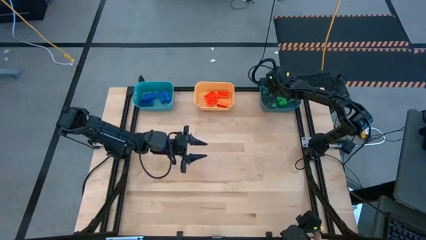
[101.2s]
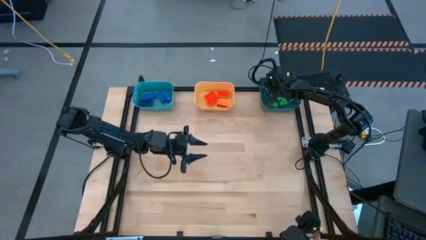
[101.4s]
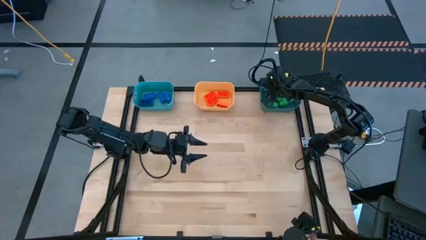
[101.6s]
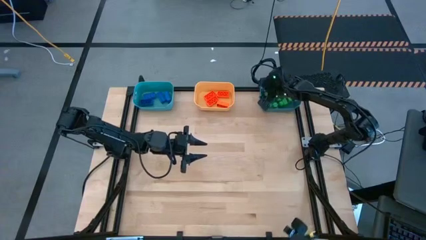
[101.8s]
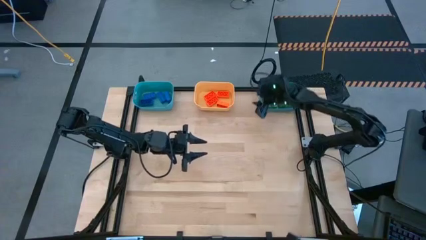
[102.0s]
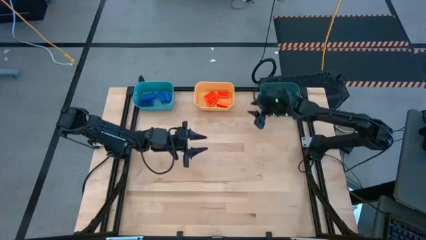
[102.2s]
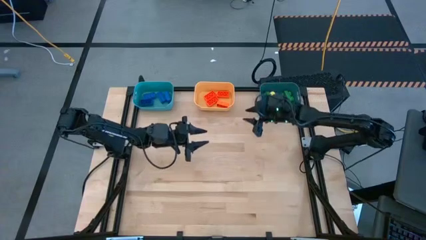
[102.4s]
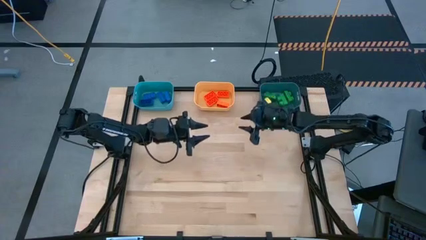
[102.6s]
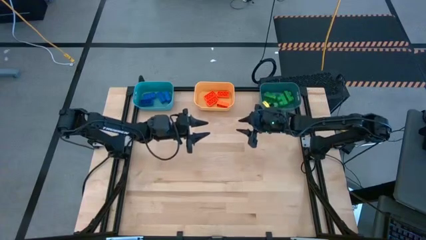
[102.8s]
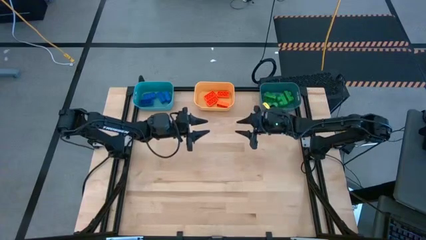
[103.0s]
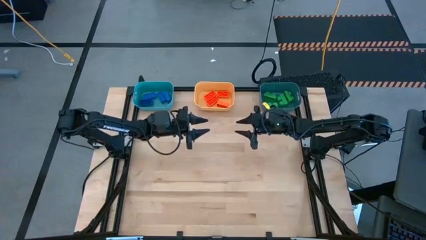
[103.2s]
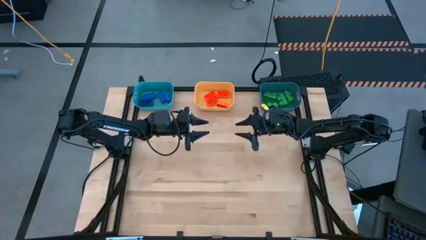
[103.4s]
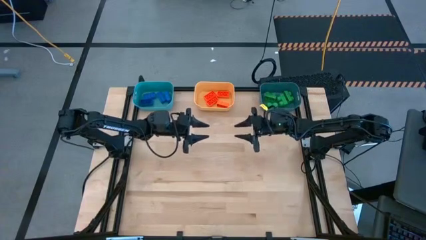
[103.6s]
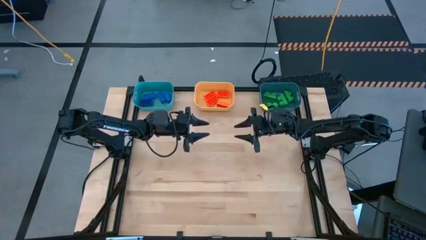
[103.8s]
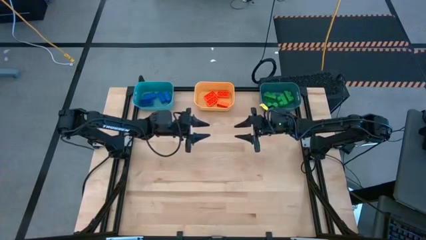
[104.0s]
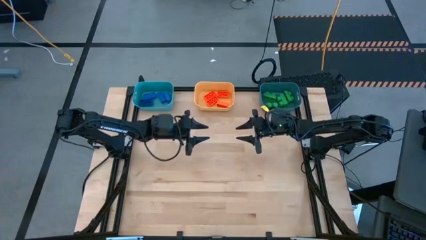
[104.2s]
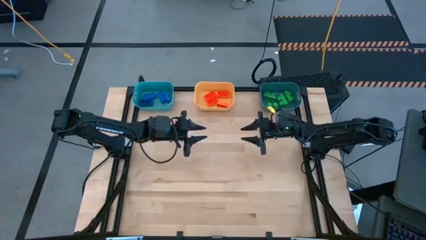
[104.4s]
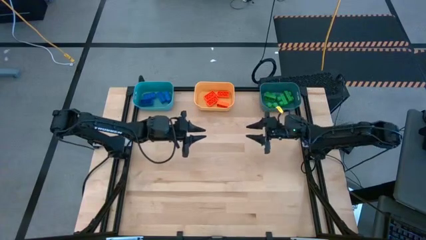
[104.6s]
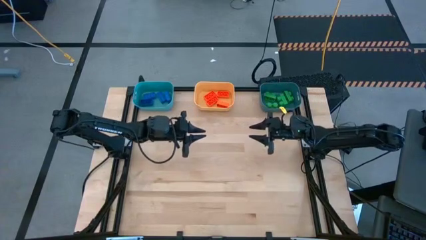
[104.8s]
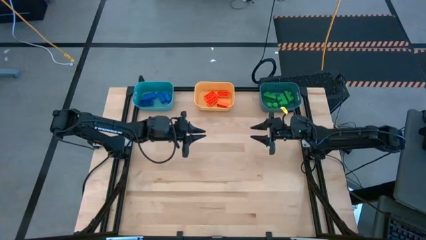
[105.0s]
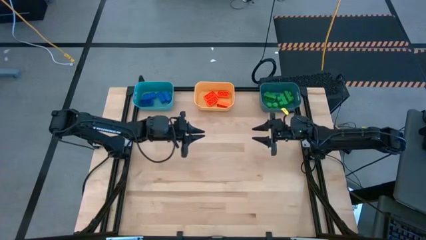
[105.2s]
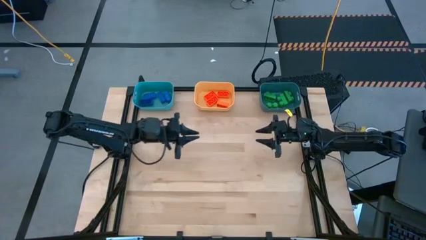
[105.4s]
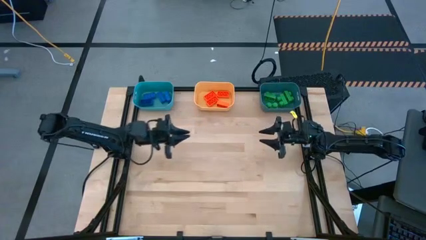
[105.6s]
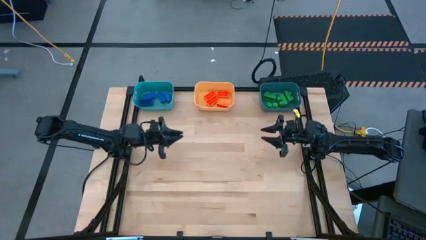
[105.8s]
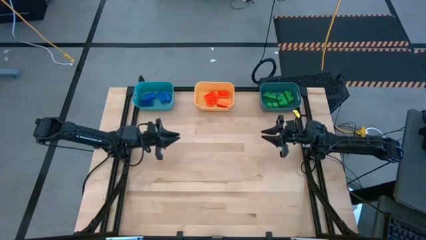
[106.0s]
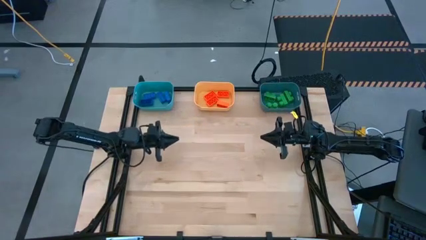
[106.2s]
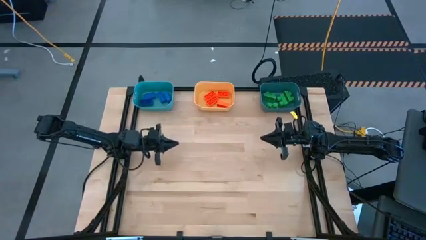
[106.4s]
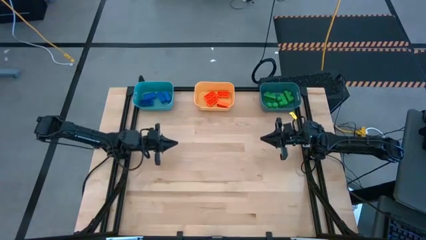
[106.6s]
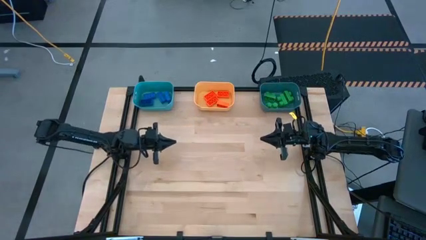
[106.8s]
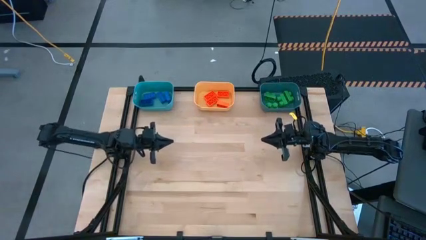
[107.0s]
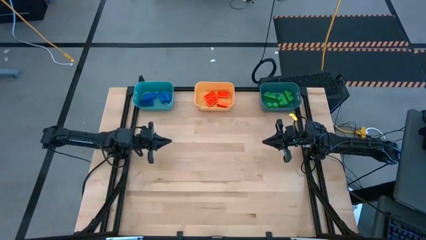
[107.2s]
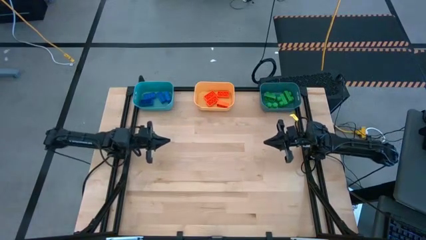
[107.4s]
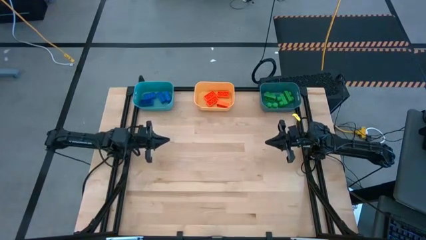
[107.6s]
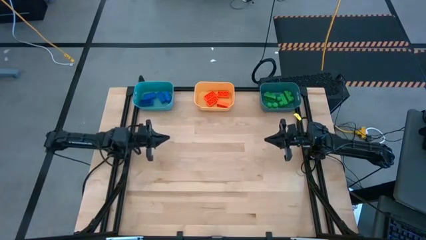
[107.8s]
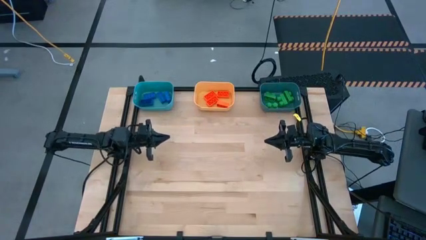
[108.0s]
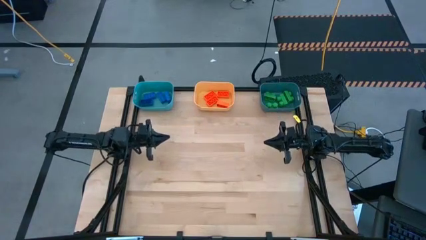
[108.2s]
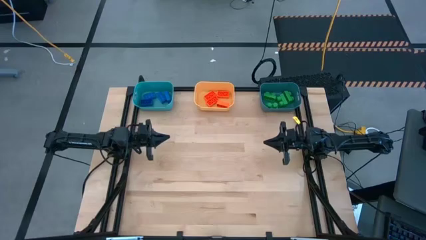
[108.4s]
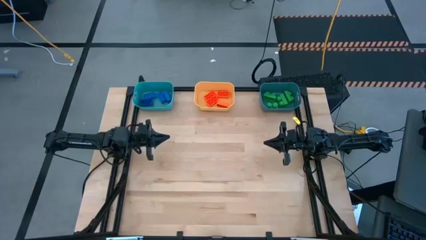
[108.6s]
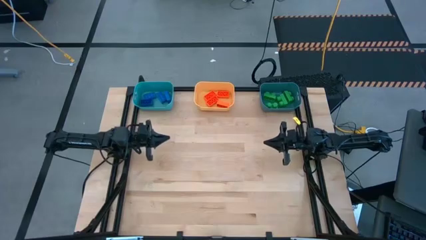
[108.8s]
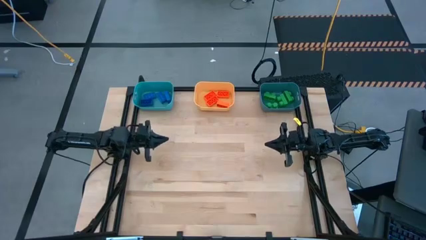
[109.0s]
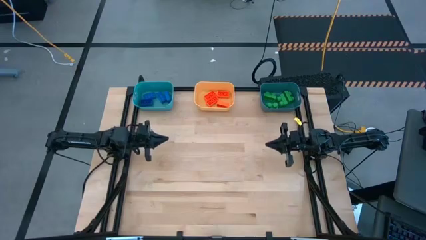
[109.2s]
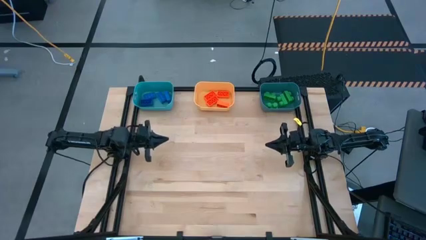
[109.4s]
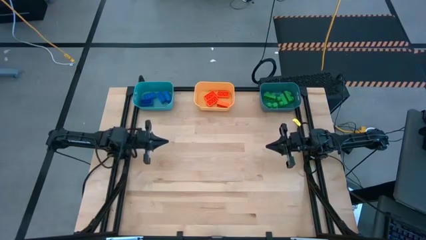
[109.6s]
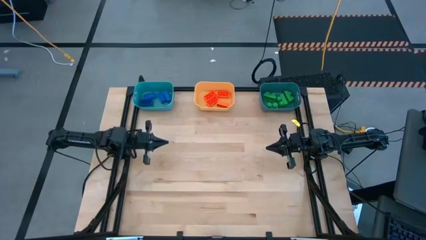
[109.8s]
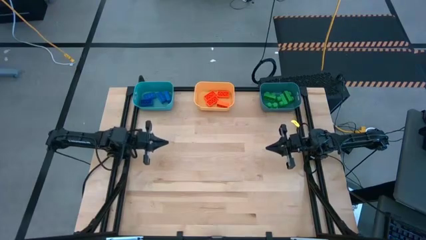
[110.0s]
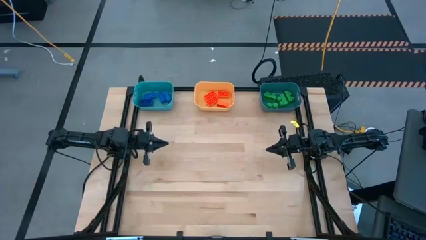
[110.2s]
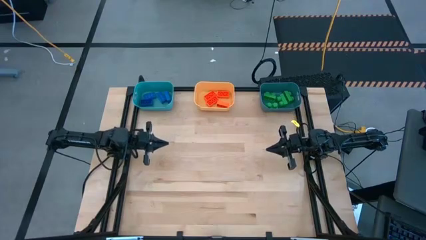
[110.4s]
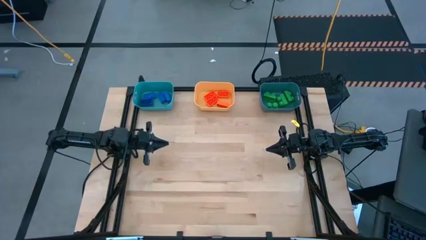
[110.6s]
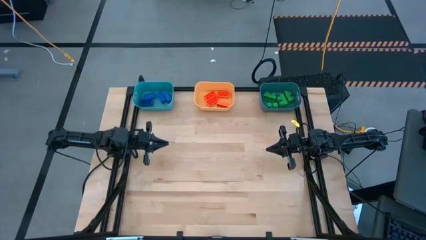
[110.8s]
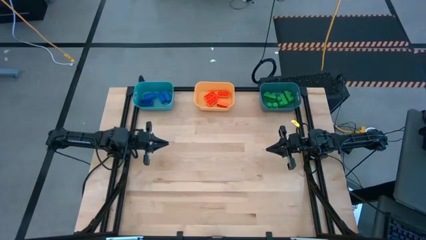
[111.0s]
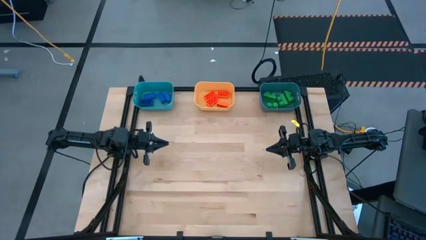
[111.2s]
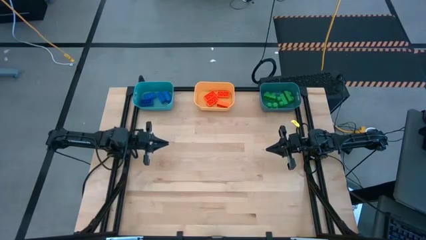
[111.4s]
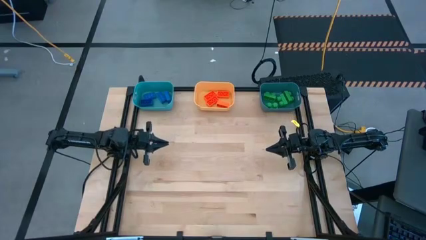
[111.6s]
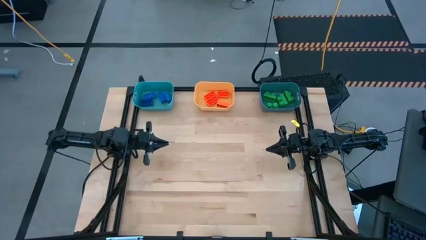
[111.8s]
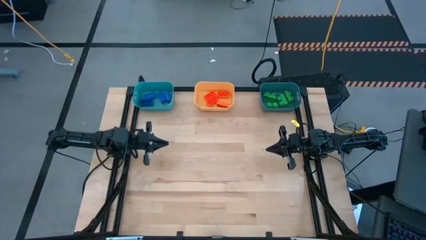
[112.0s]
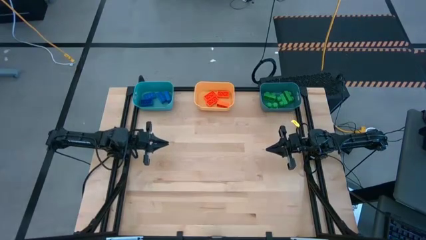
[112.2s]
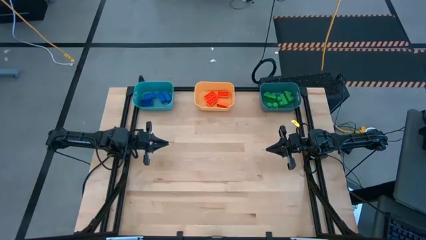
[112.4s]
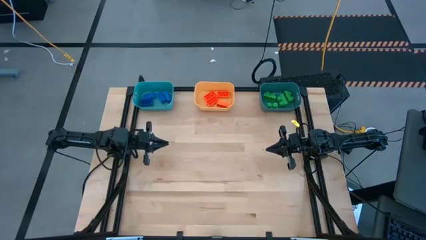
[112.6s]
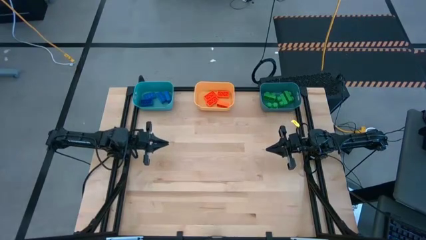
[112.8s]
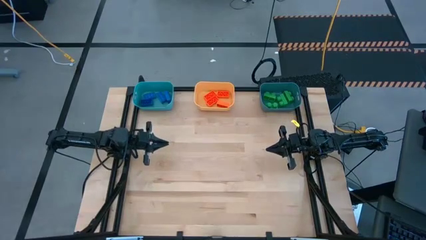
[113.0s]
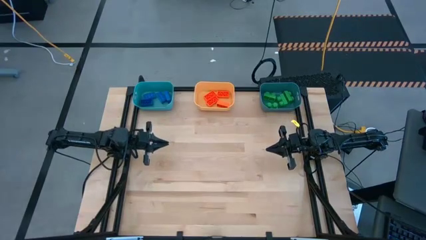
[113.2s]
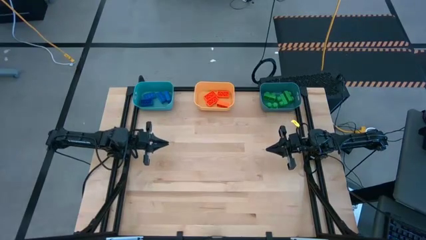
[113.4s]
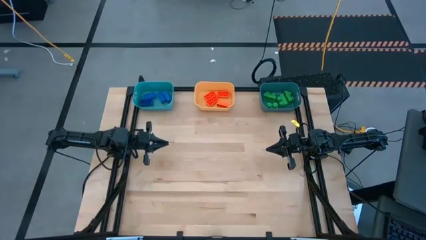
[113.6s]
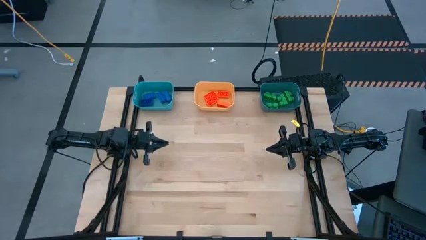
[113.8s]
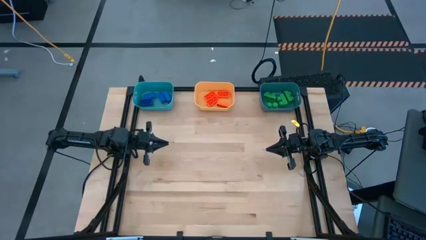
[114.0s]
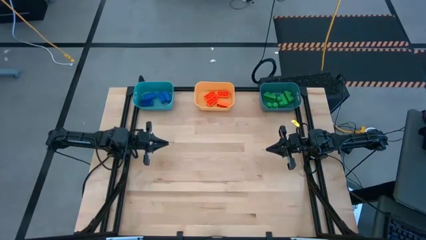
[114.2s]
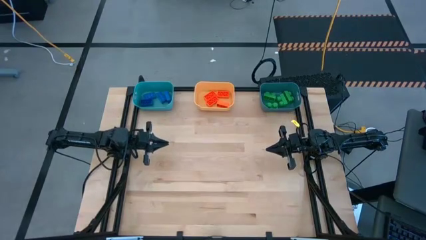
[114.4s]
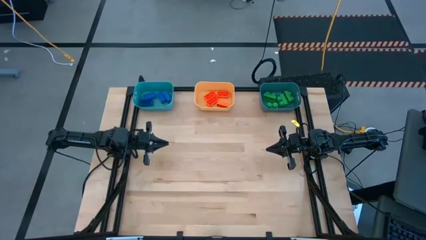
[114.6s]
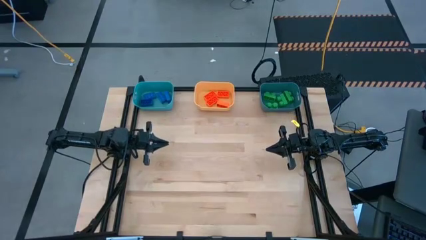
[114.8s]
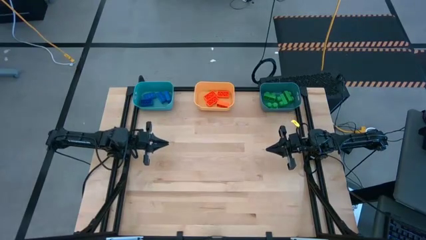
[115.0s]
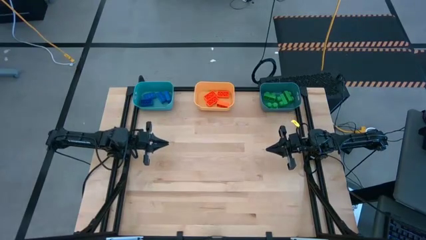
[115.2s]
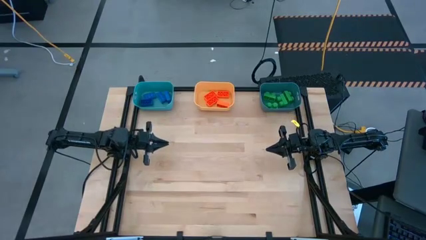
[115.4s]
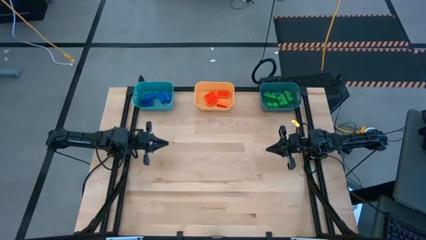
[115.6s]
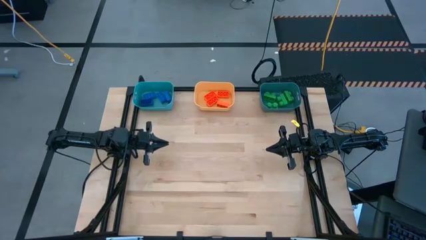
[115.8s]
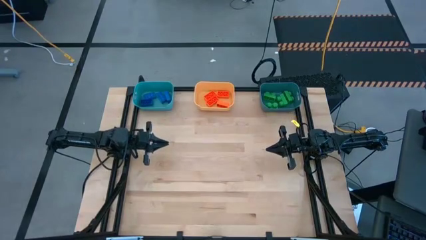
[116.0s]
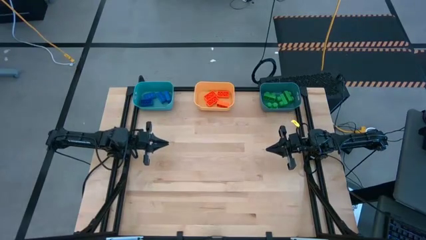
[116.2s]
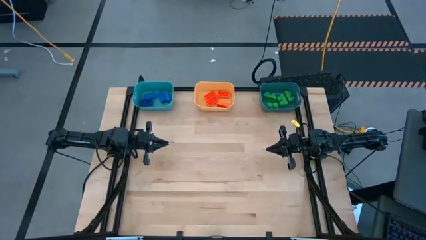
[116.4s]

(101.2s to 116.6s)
Task: Sort & place blocks by color
Return to Home Position
